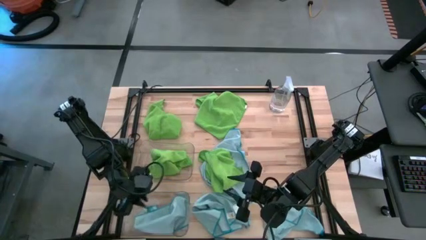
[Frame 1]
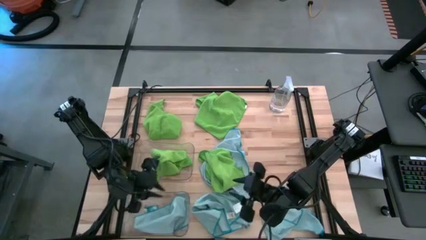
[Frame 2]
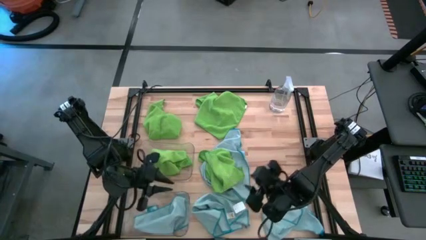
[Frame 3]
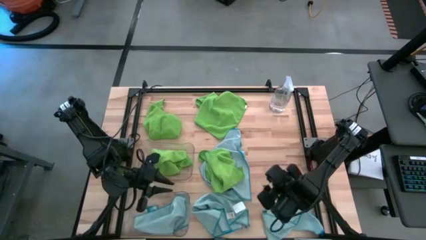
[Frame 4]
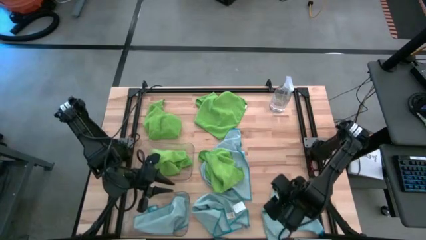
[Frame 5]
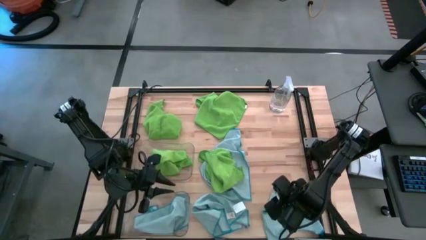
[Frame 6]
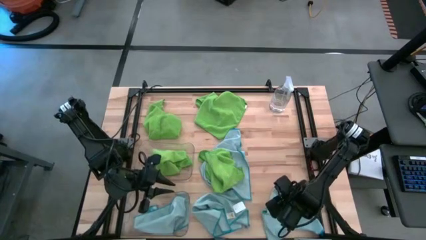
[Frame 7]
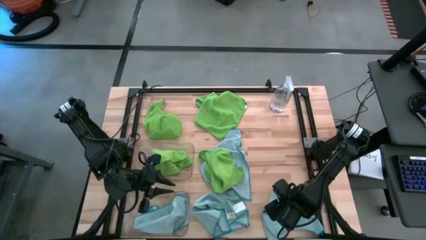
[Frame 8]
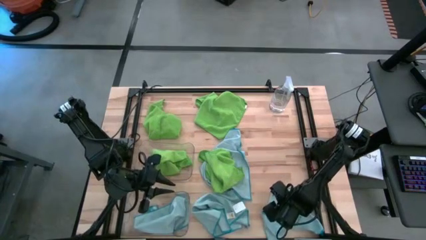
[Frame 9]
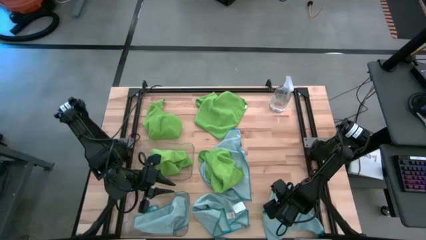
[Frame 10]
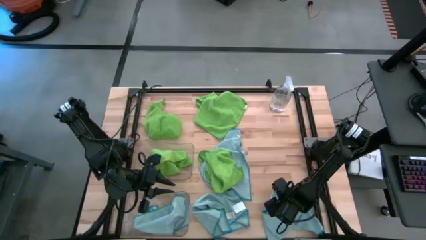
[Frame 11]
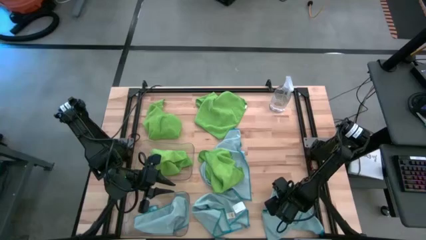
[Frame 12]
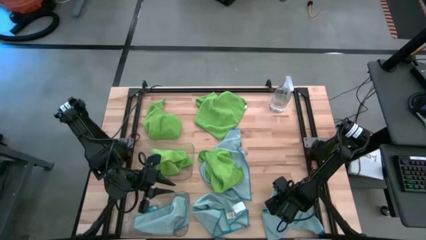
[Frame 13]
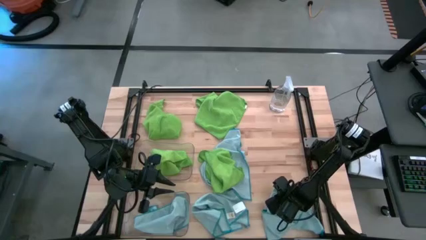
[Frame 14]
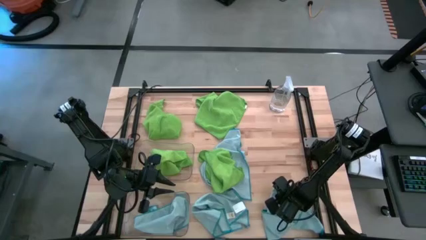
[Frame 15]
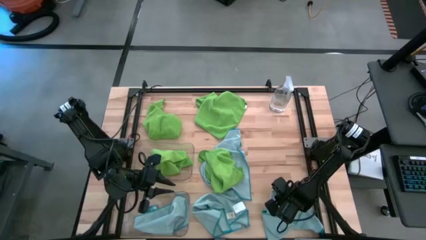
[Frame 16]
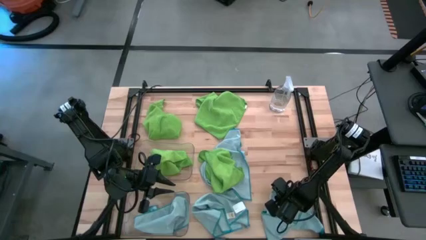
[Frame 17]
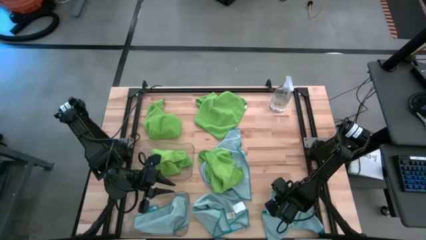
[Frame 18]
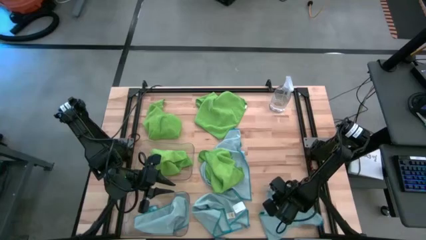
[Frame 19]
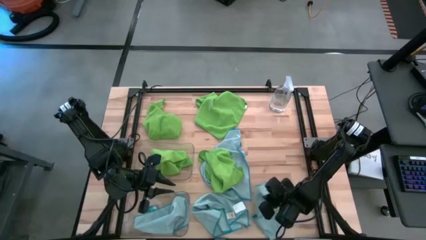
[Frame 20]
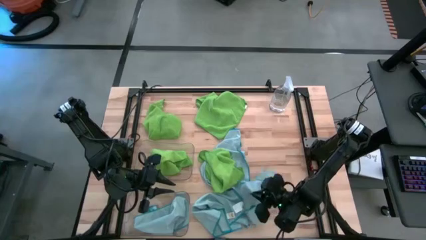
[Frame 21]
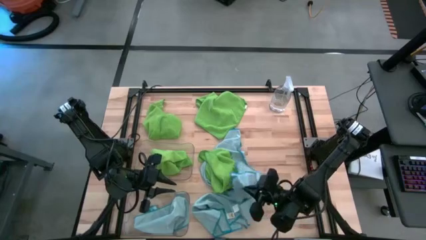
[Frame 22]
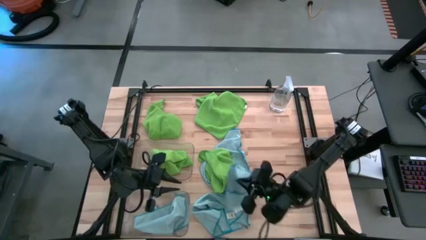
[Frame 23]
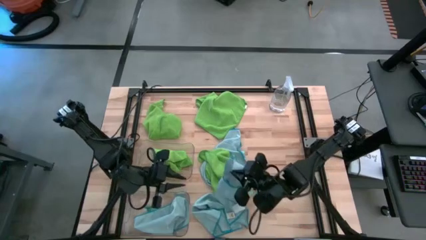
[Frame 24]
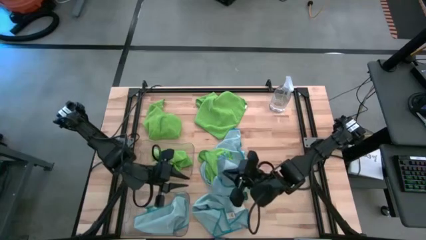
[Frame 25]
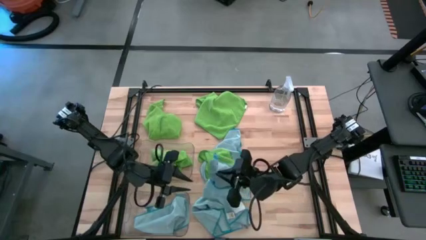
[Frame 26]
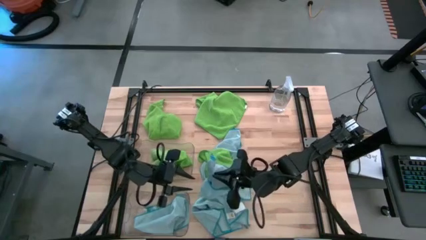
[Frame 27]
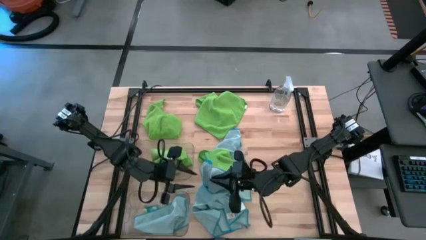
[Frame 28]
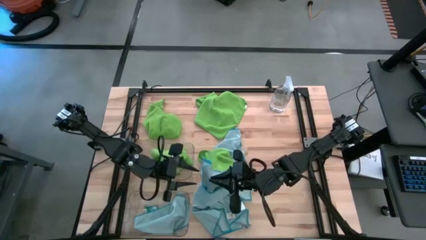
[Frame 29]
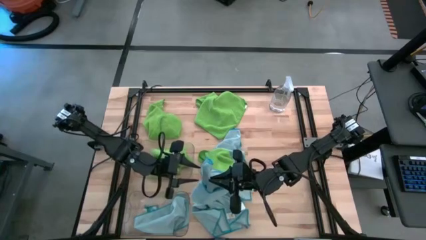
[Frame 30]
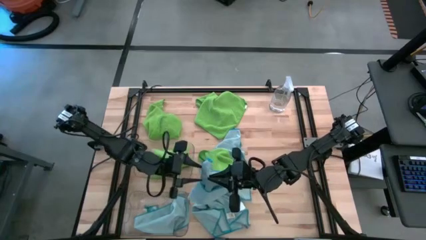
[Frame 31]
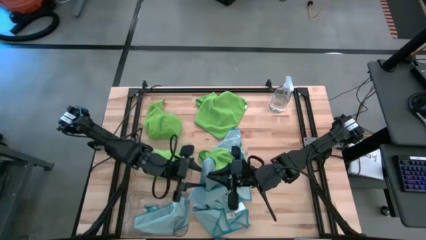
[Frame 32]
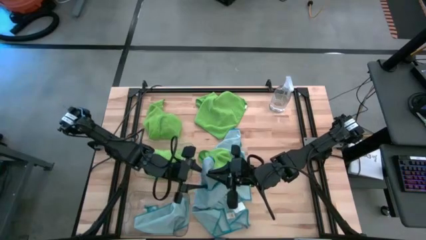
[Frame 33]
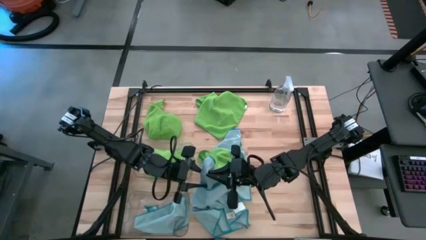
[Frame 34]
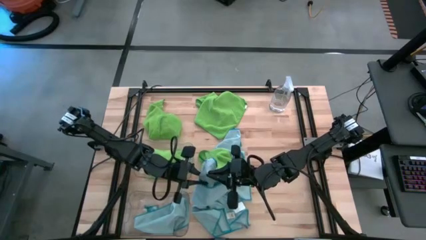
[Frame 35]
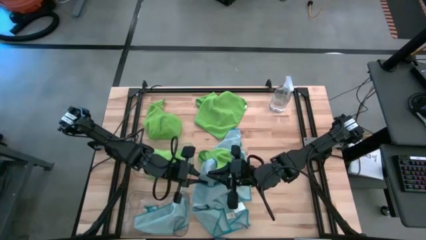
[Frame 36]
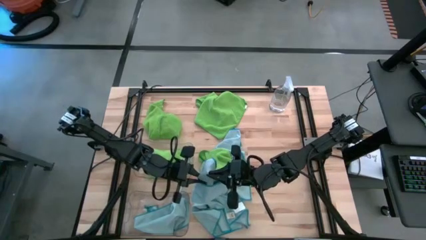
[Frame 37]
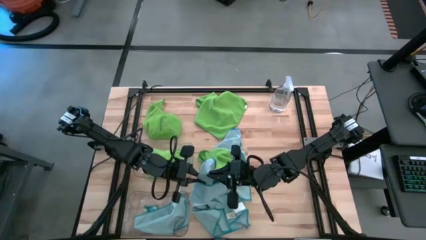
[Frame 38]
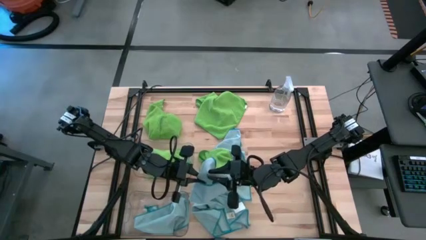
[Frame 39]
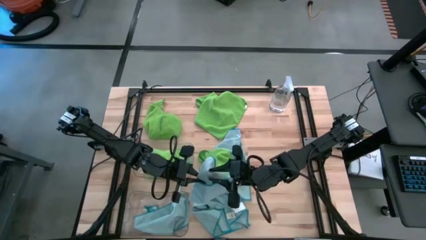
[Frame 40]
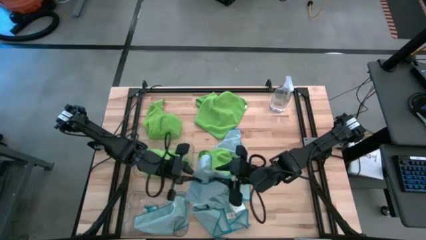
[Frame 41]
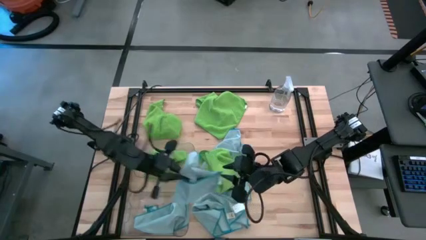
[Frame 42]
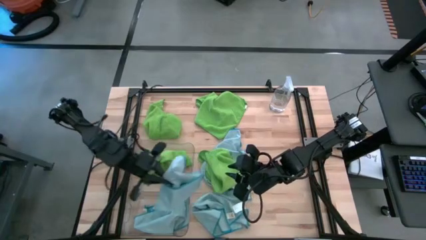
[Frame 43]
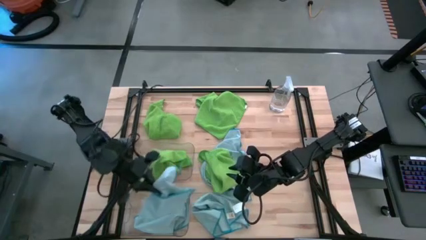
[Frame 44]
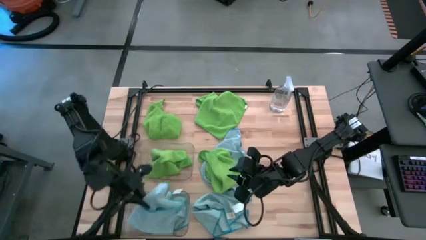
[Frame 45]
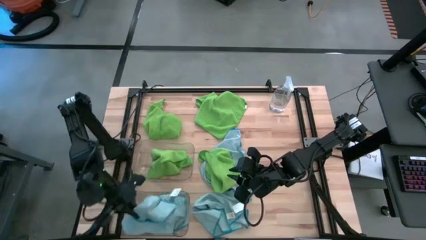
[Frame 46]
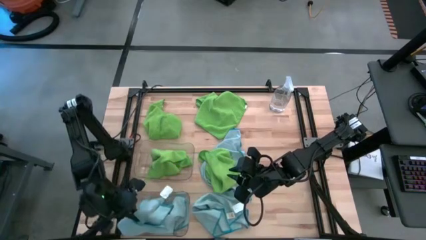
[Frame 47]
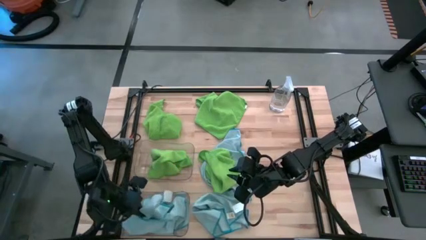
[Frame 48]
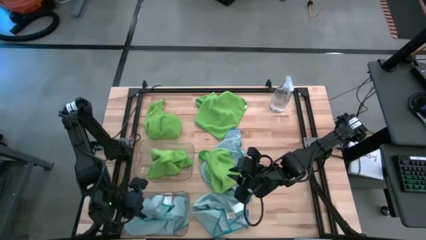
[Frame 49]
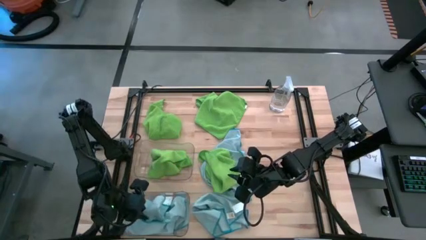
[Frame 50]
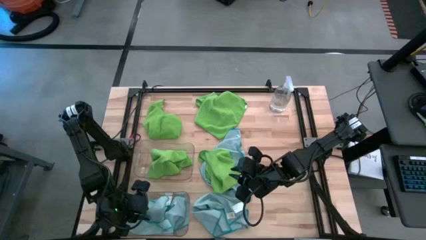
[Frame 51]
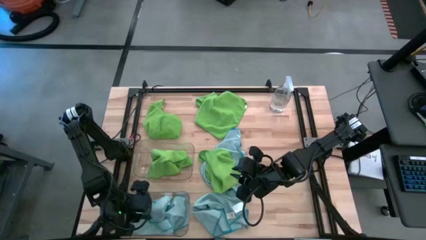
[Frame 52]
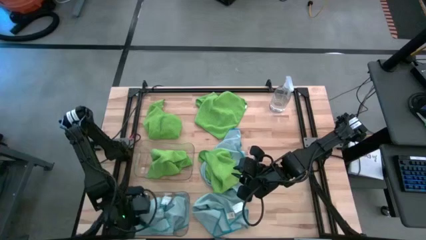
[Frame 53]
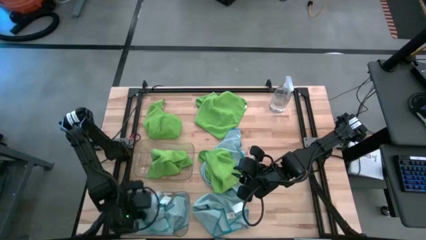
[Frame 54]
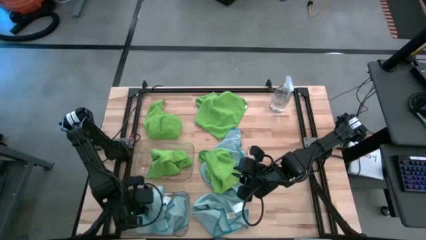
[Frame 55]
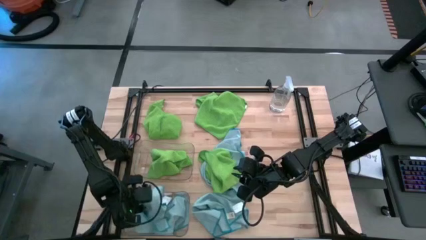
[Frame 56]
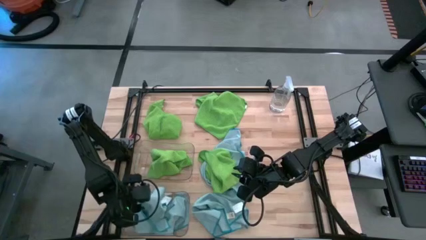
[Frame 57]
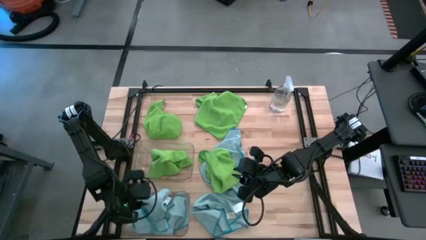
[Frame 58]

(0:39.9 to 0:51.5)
Task: Sort microfiber towel by color & place in baskets
Put the right blue microfiber cloth into the bottom transparent bin

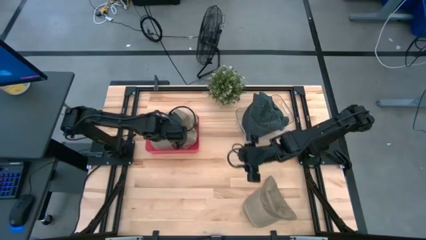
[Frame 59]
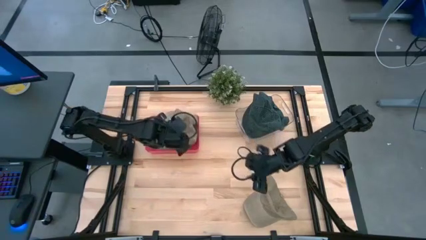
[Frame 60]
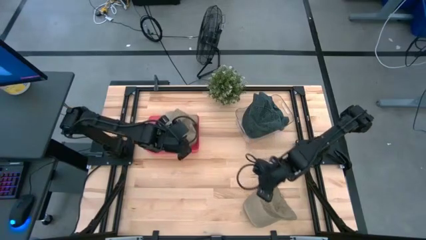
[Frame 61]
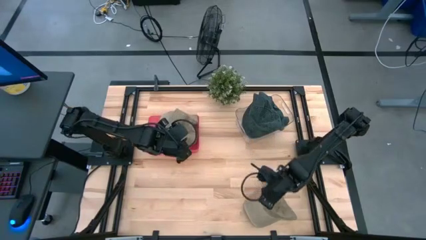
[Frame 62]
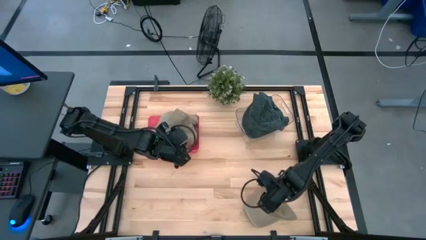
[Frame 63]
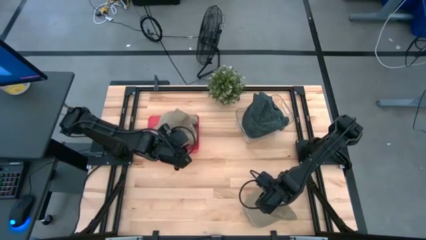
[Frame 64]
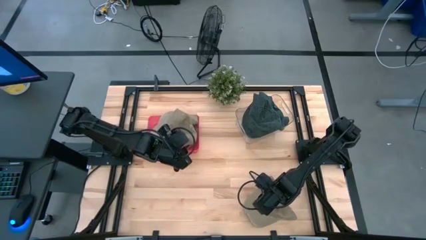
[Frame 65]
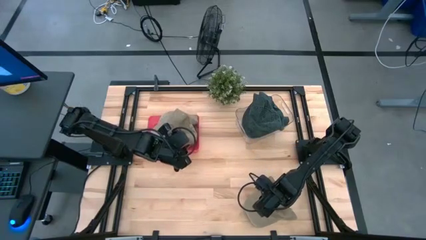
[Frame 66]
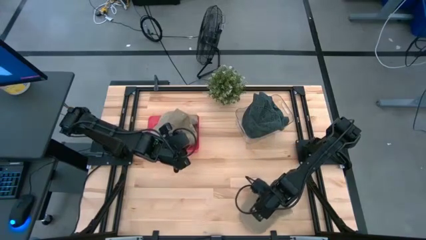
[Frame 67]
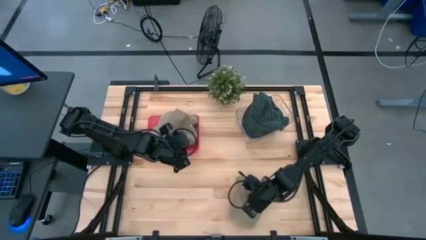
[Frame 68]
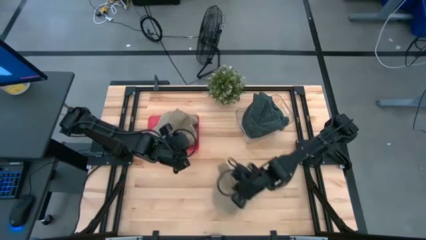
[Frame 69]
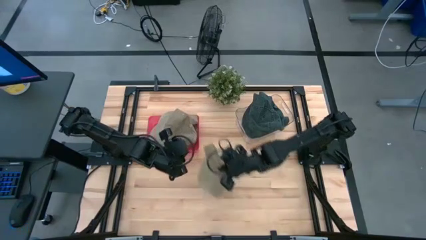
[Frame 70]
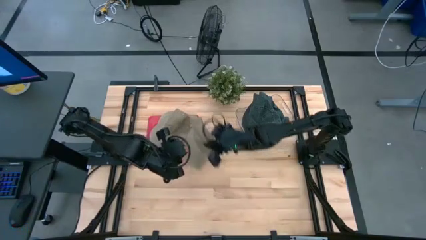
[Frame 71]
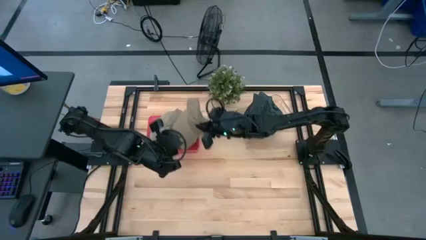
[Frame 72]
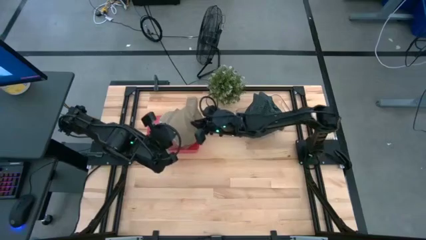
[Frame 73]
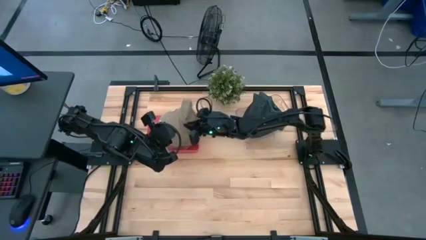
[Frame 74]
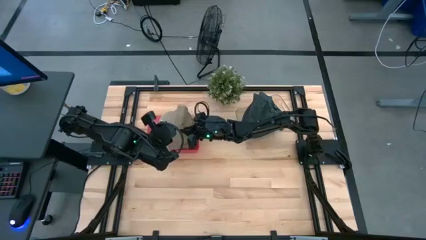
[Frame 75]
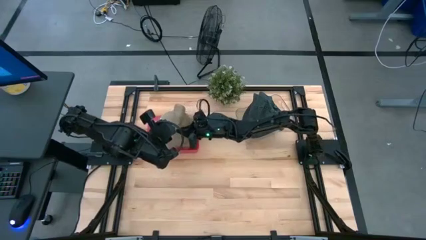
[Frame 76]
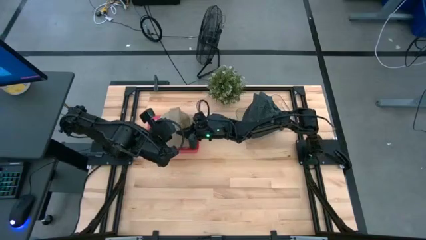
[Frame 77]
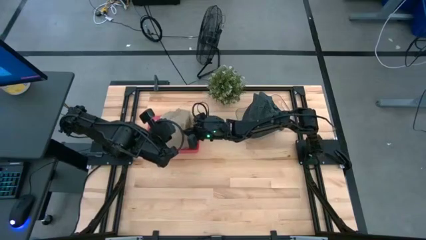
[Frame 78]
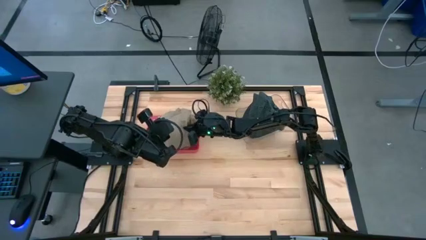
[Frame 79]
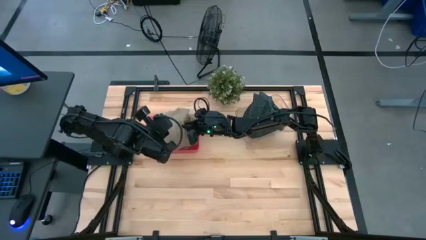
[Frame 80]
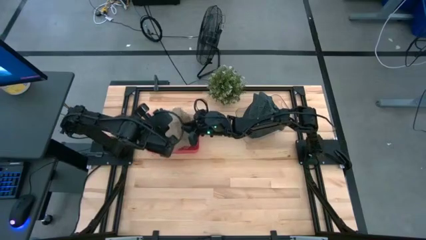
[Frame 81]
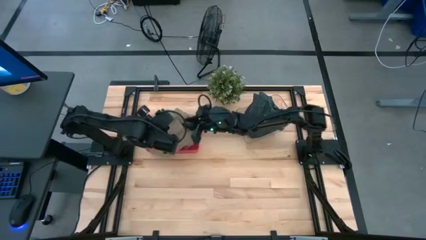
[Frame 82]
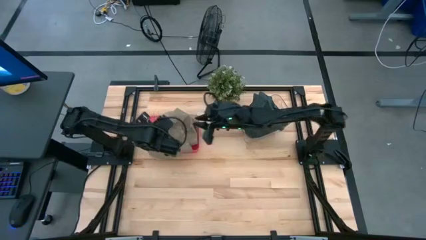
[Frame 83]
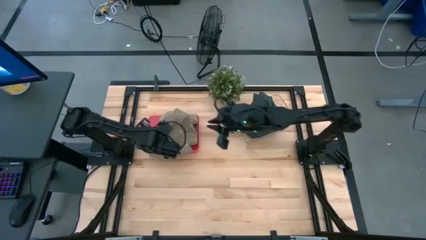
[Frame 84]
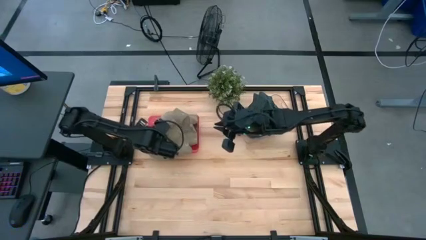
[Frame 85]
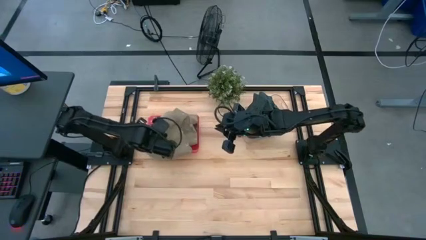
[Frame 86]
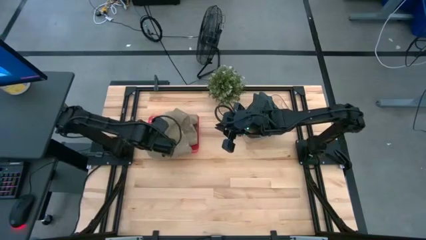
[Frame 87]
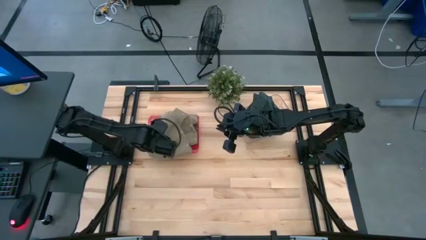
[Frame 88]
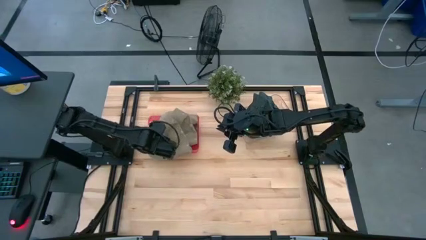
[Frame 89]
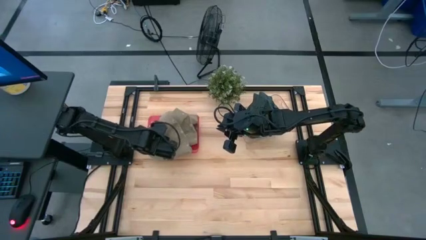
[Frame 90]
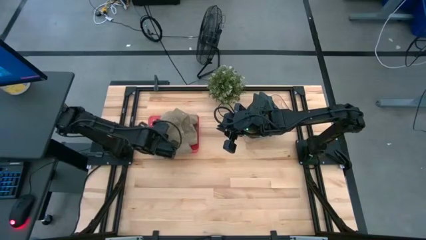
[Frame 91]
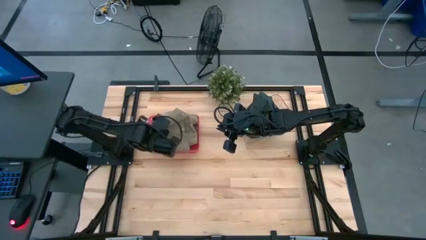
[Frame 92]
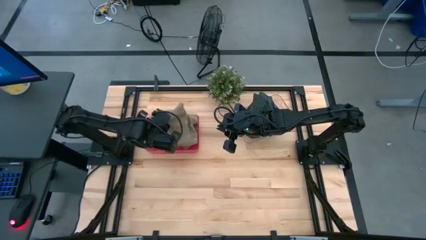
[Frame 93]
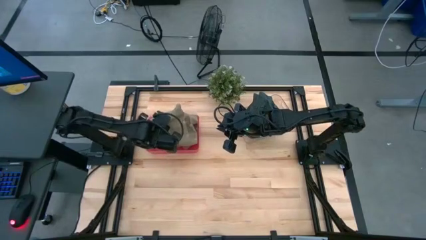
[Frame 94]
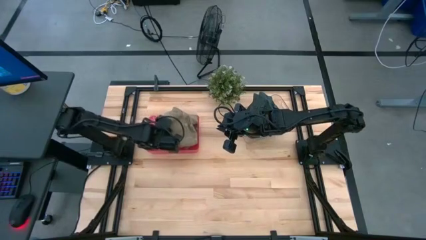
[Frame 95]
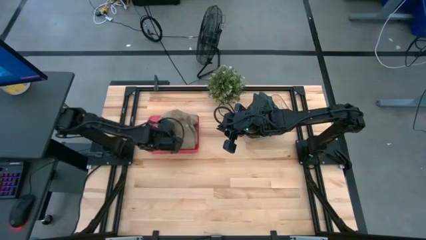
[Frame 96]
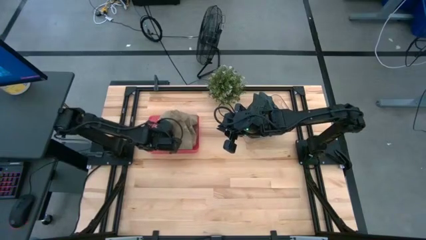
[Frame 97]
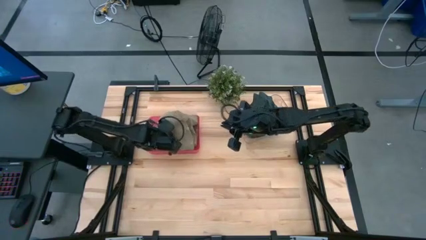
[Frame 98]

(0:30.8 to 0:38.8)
Task: Pick & Place hat
Put the brown cap into the red bin
